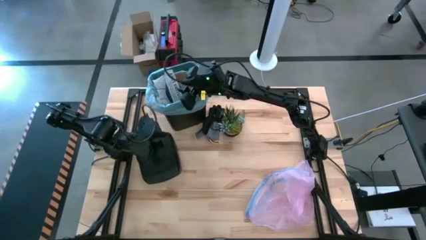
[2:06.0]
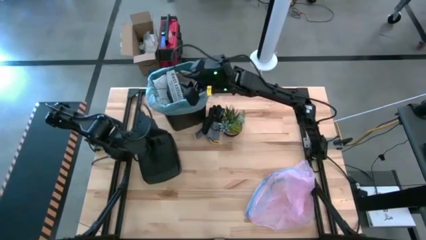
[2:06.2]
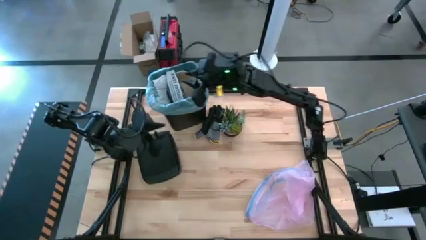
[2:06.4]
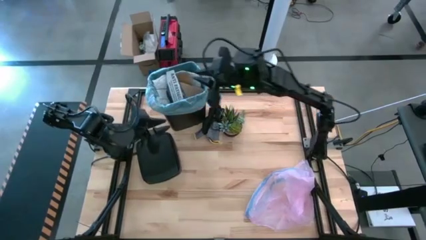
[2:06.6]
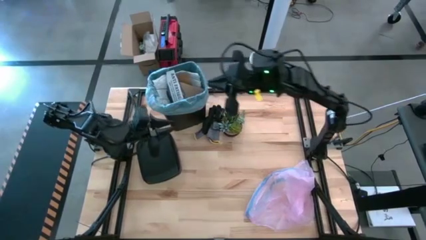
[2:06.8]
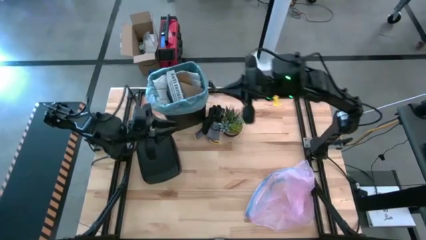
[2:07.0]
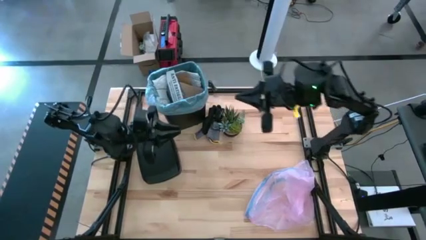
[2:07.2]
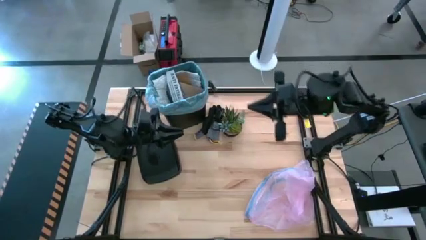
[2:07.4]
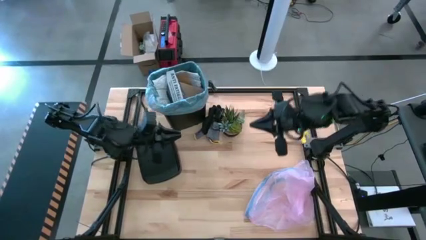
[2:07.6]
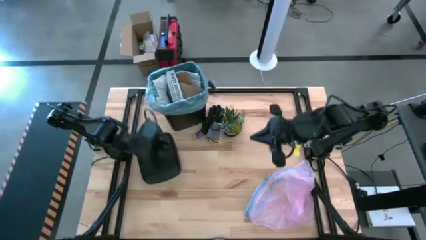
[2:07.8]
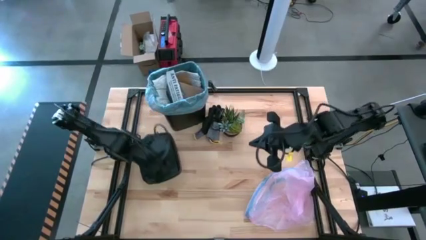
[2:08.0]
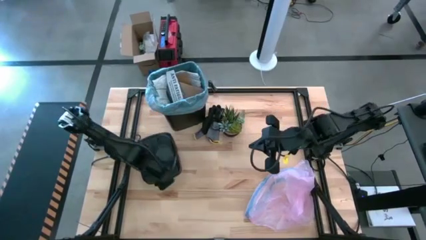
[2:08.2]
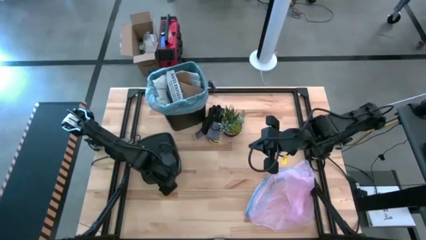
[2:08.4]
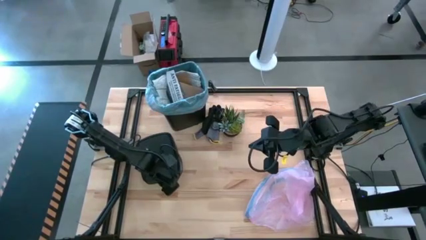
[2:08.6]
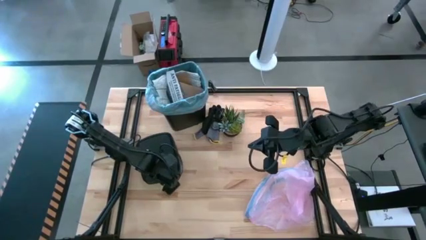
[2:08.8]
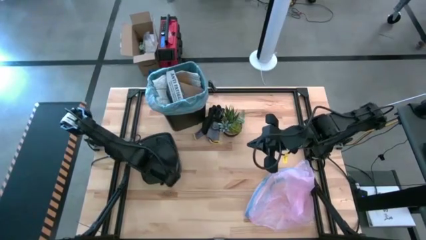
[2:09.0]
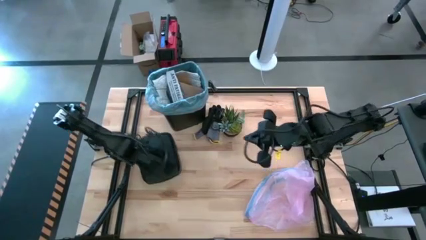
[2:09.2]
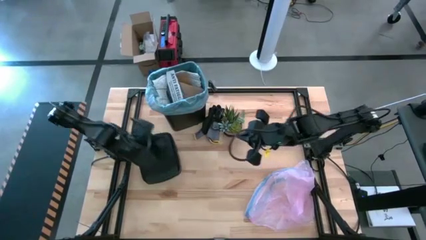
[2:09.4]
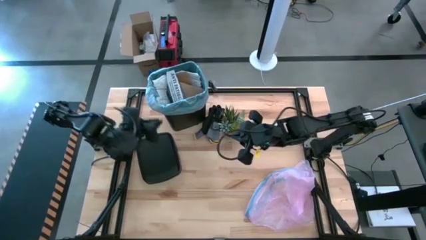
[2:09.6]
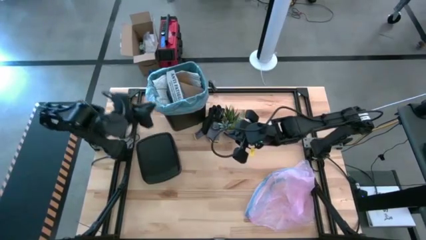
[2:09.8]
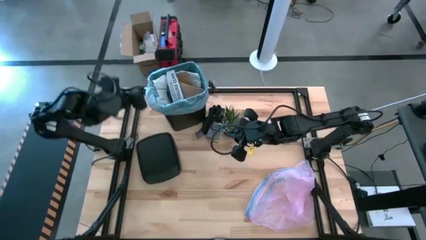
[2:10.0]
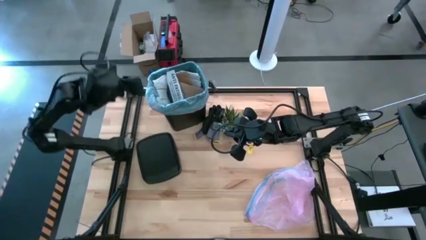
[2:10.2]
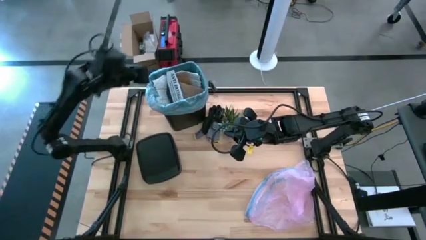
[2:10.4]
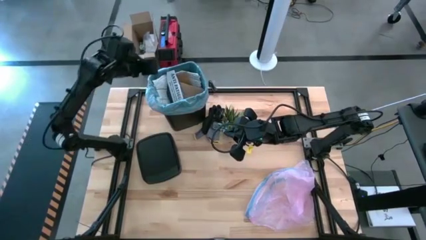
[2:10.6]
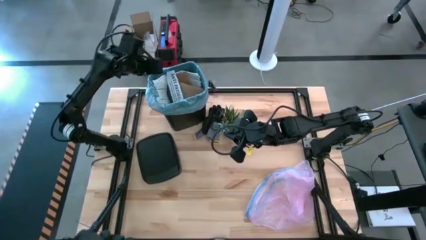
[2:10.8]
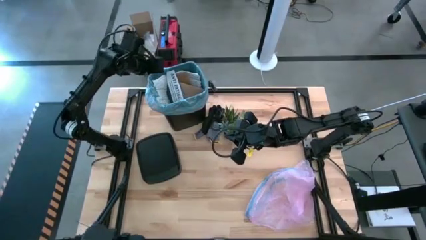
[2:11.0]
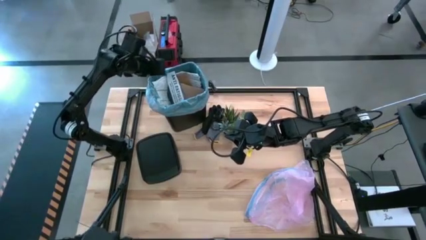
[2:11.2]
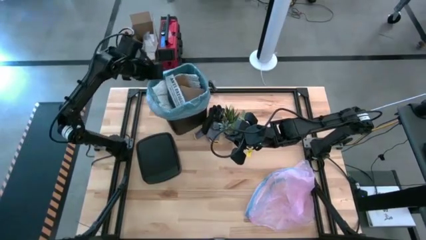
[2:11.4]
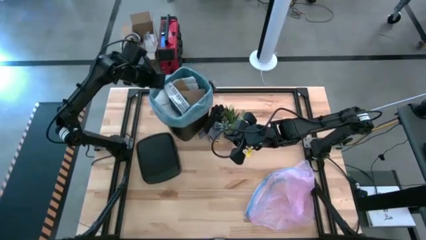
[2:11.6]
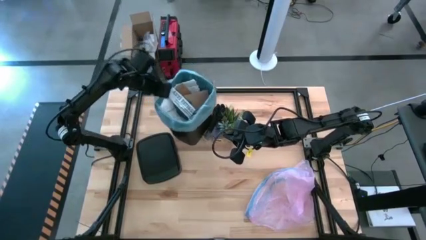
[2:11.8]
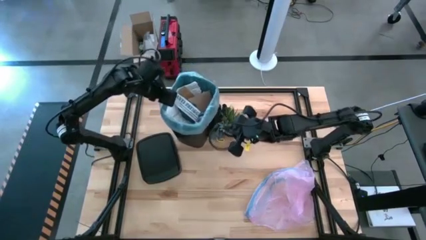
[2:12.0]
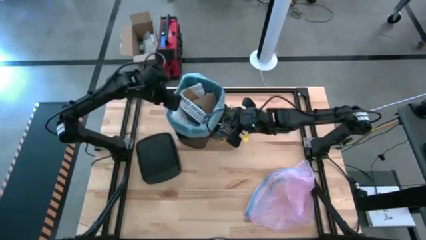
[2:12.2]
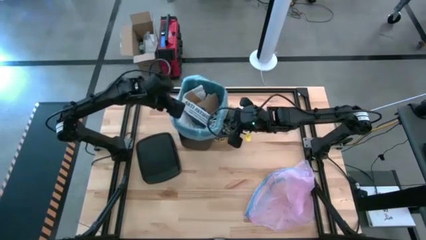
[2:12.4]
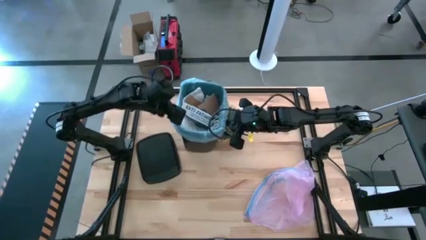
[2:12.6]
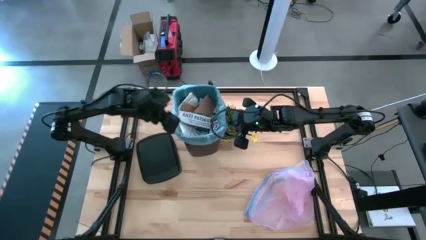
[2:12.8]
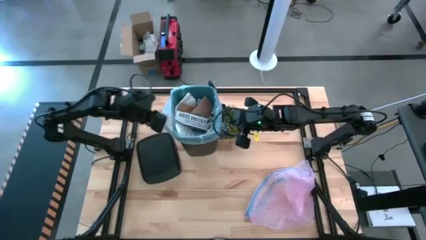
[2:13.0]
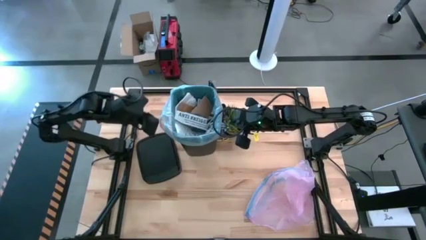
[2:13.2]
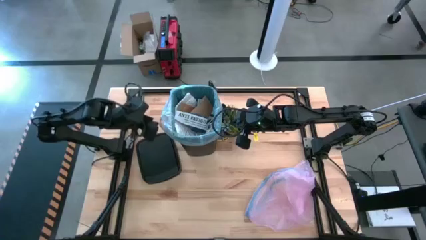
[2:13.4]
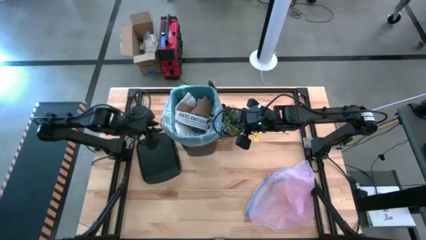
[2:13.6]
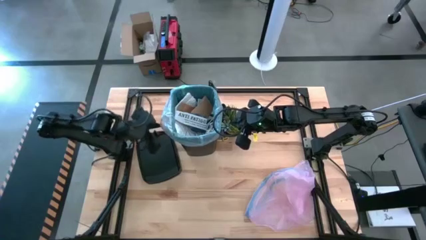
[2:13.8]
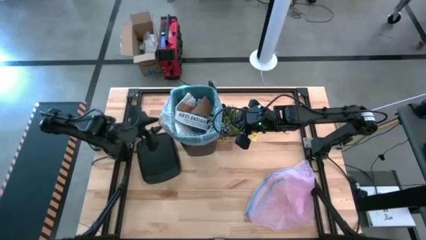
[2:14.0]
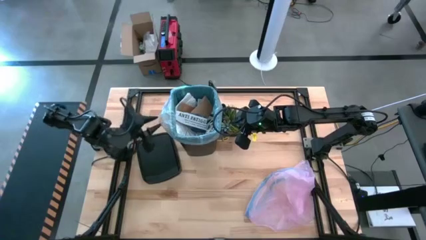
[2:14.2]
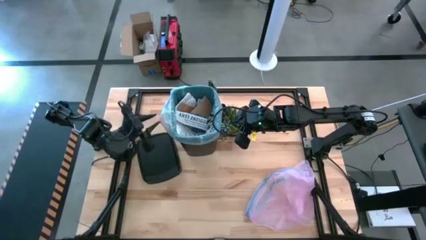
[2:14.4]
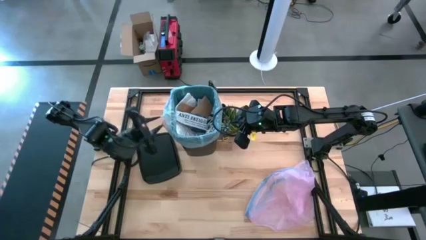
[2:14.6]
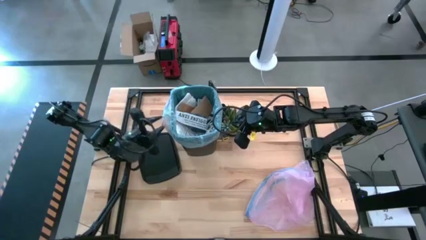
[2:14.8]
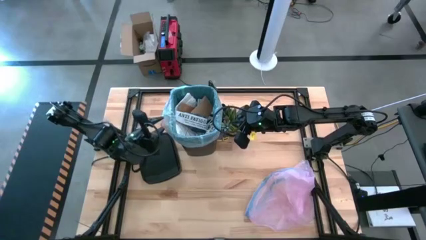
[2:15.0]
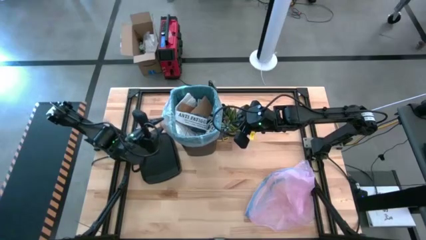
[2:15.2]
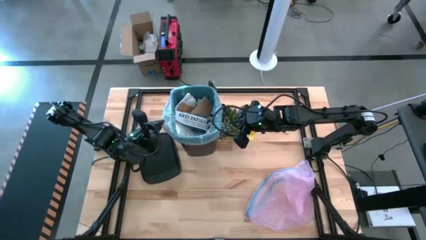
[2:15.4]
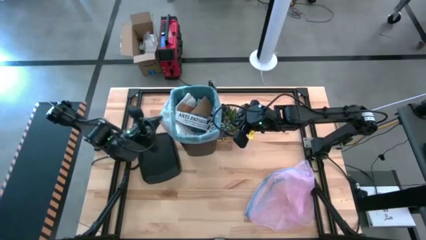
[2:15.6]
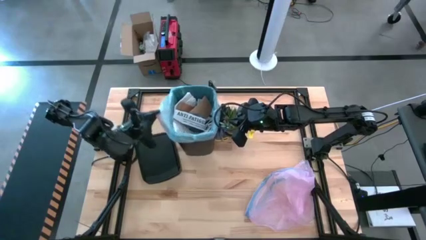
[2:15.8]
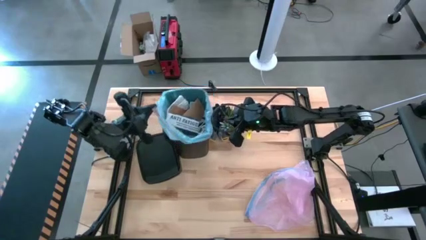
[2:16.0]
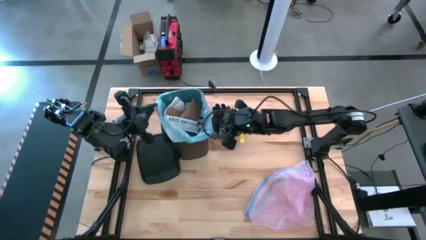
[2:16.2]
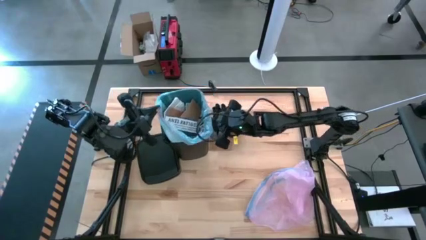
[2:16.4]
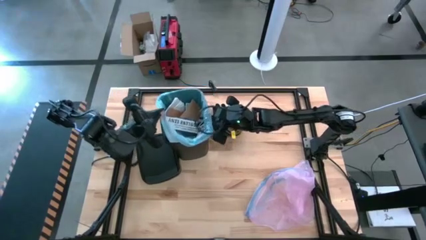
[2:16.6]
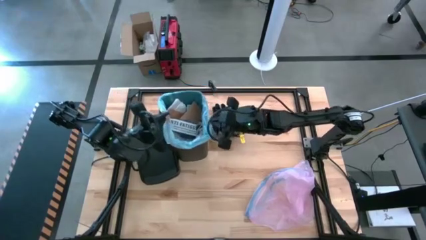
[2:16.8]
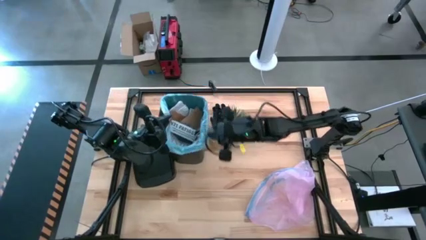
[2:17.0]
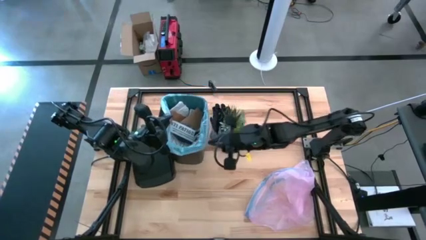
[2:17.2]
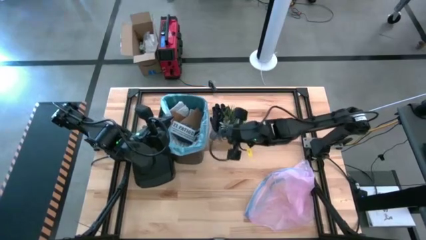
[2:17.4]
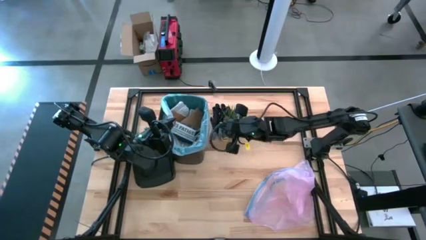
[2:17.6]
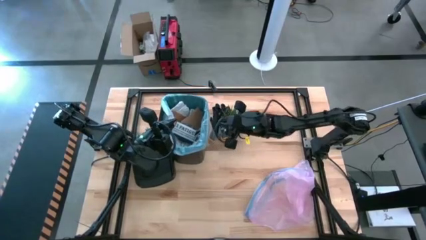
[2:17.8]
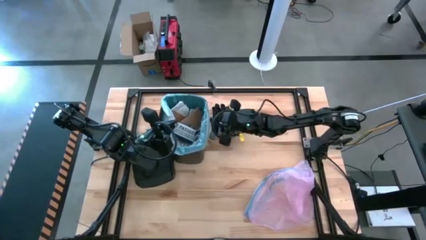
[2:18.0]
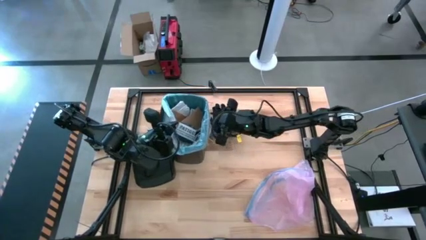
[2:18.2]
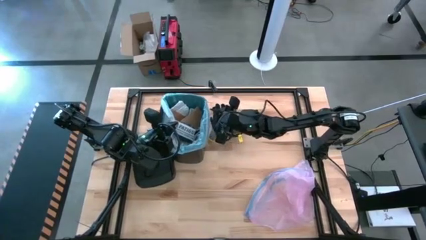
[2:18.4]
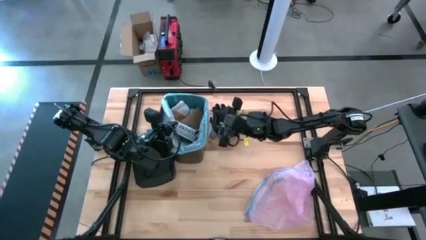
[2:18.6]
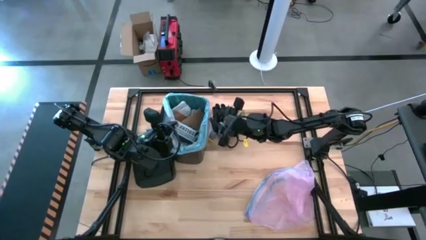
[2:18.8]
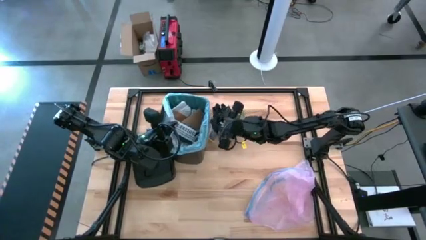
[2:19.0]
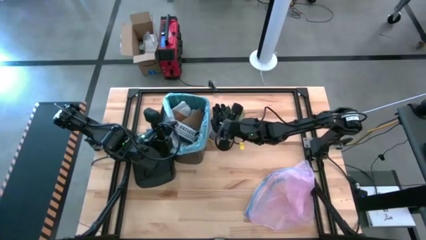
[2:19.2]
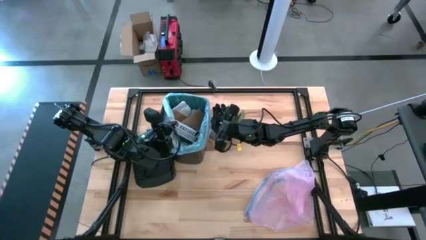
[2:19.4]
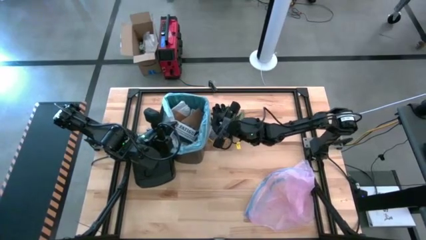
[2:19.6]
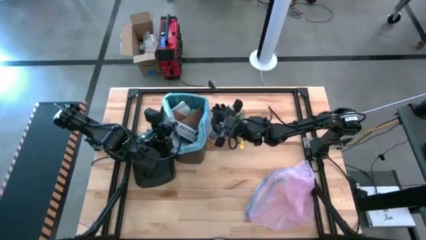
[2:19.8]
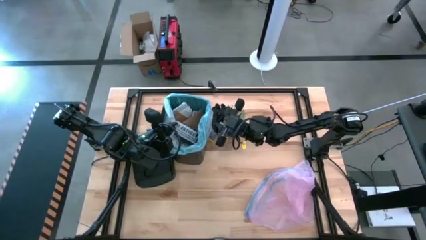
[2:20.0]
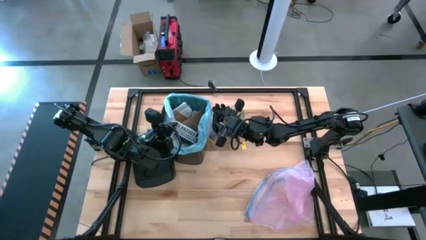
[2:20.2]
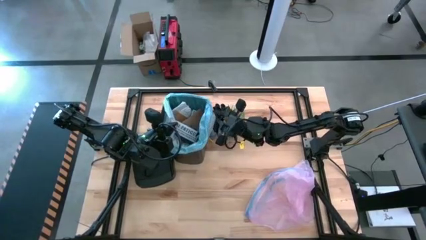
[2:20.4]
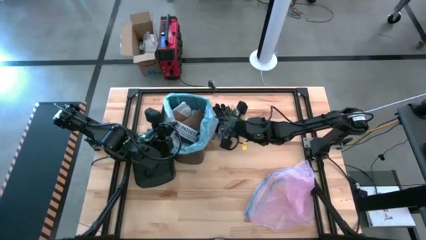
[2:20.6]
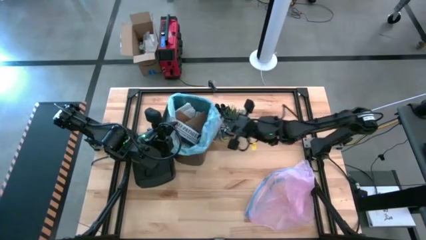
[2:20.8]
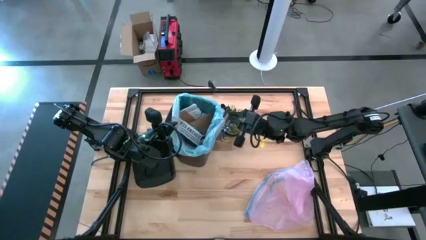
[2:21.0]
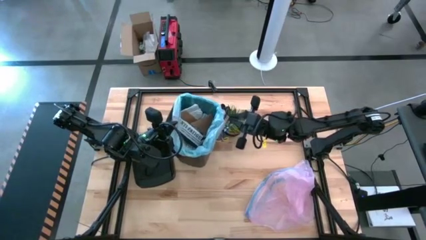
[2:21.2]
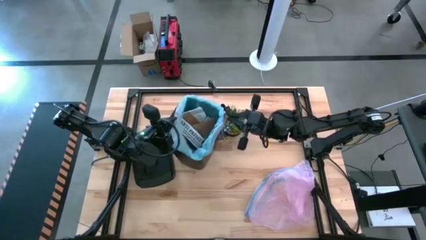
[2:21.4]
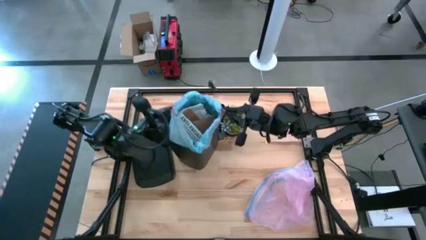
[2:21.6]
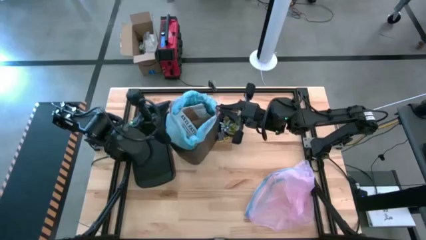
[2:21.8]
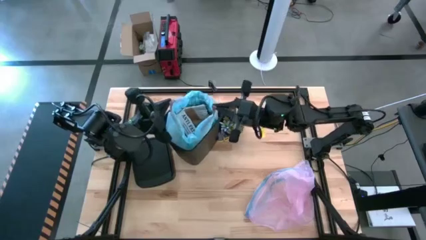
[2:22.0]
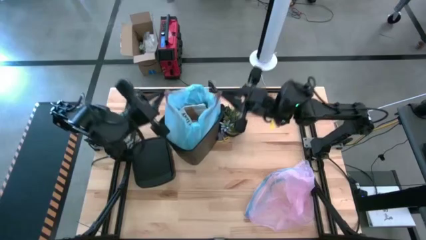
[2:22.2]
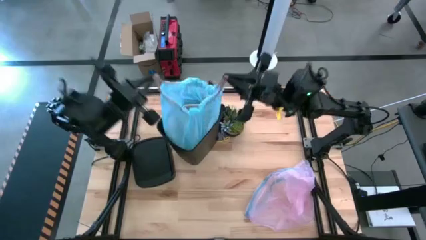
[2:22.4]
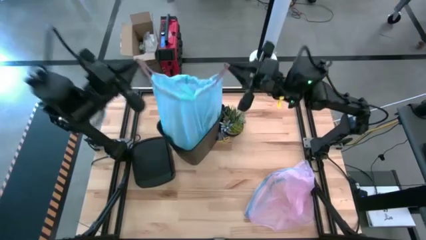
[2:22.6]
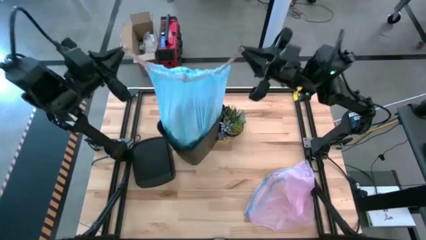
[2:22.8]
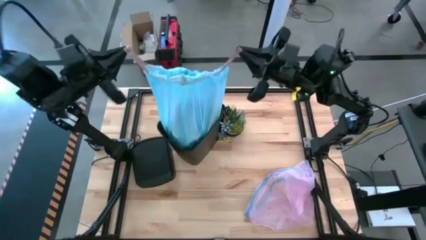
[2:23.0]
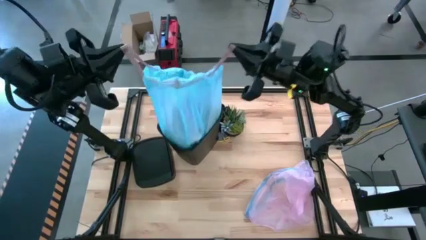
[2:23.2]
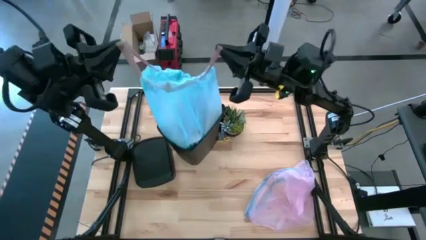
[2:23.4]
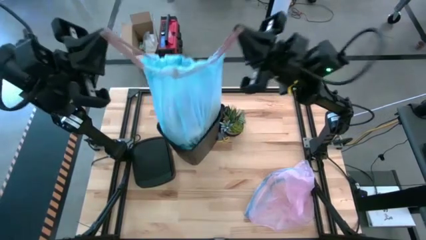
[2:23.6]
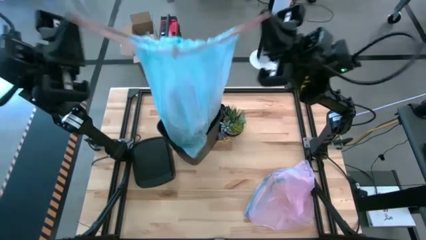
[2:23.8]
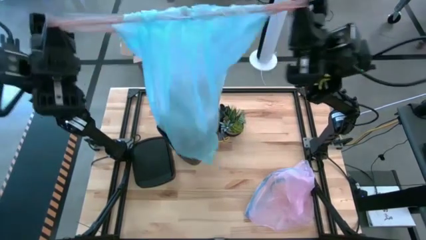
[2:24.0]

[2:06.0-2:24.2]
Task: place trash/remove bag and relplace
Remove the blue trash bag from the trash bin
